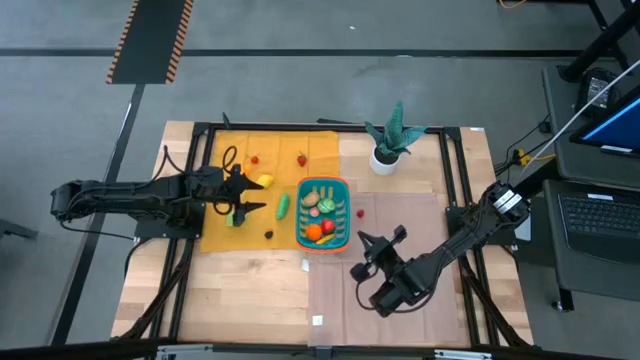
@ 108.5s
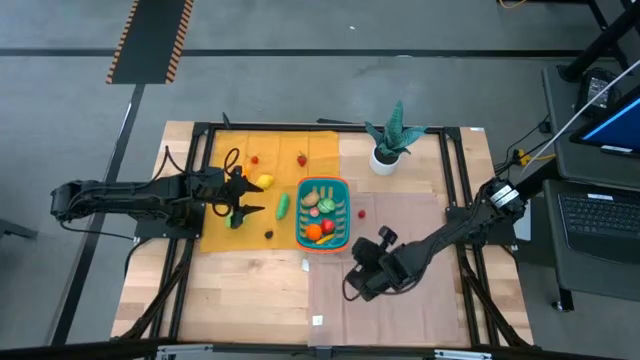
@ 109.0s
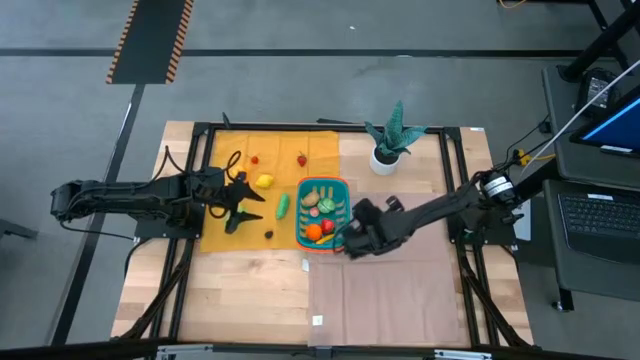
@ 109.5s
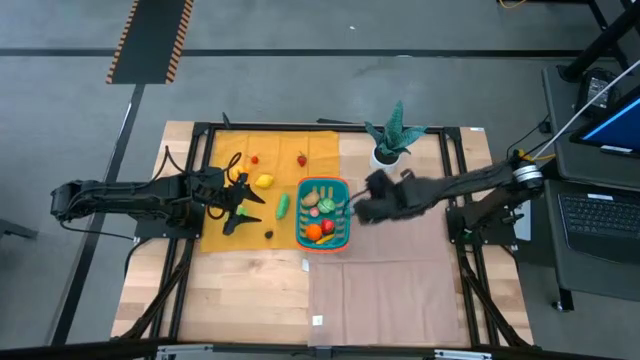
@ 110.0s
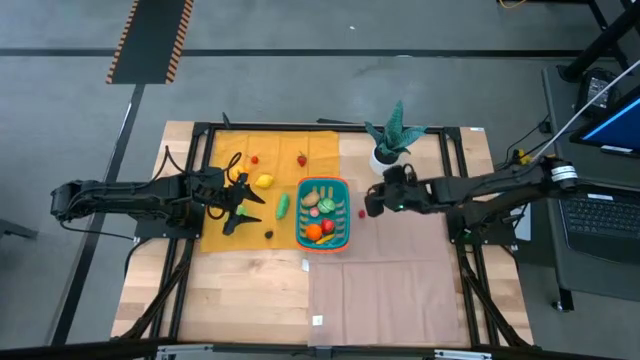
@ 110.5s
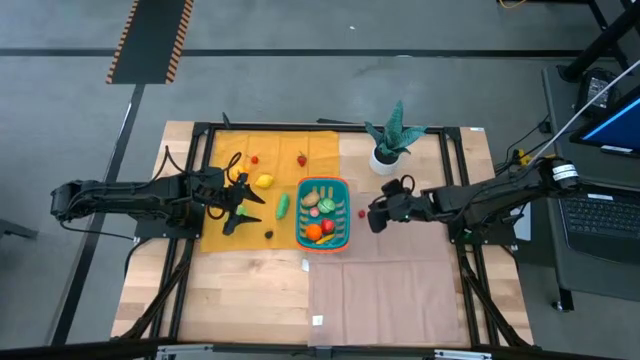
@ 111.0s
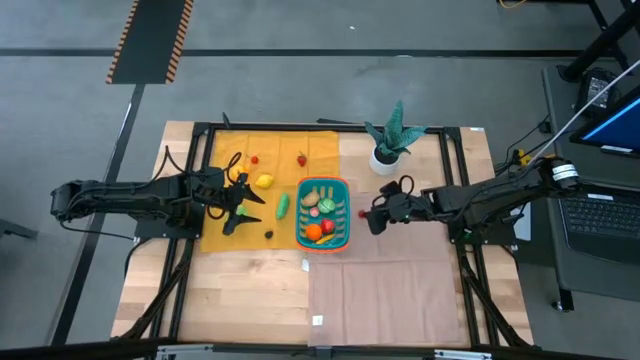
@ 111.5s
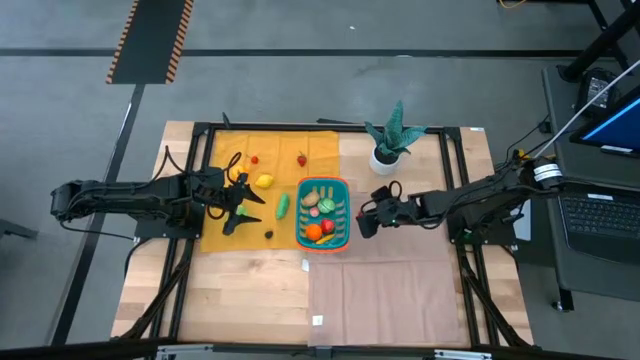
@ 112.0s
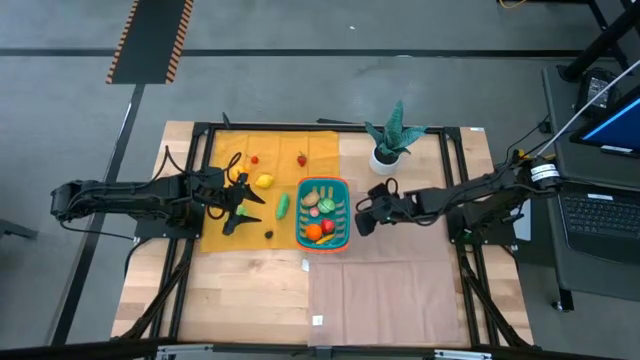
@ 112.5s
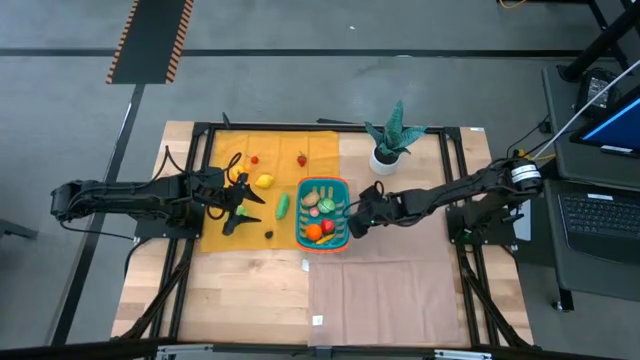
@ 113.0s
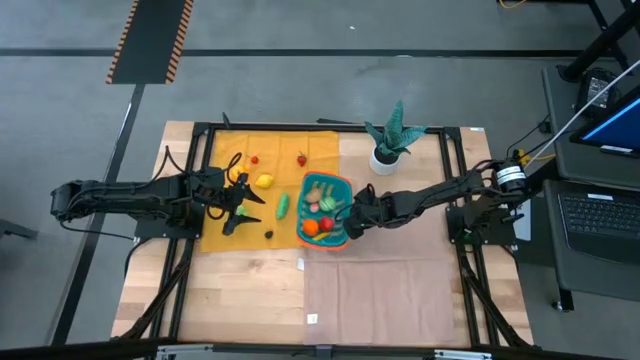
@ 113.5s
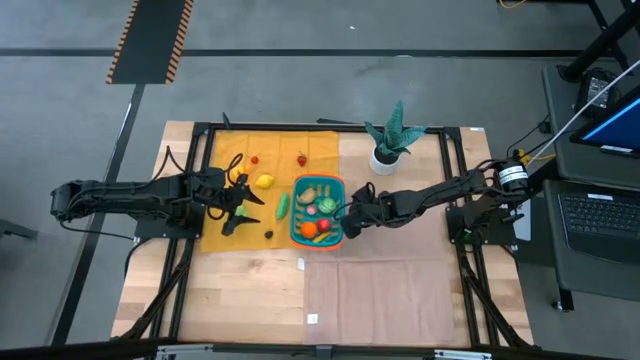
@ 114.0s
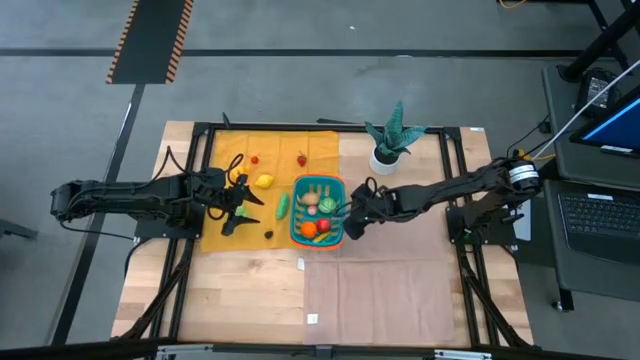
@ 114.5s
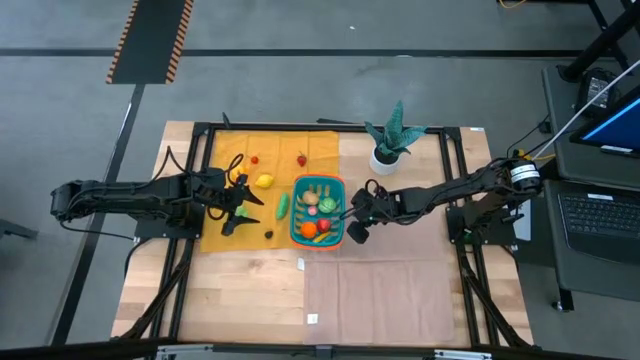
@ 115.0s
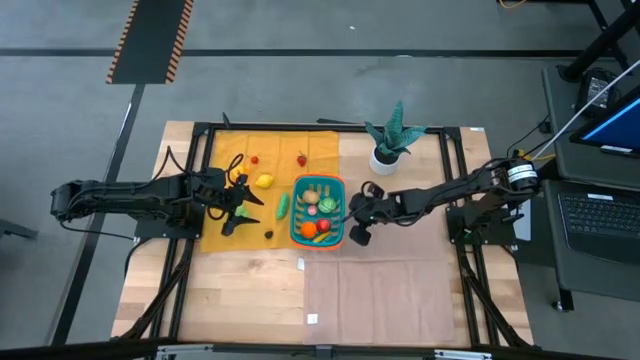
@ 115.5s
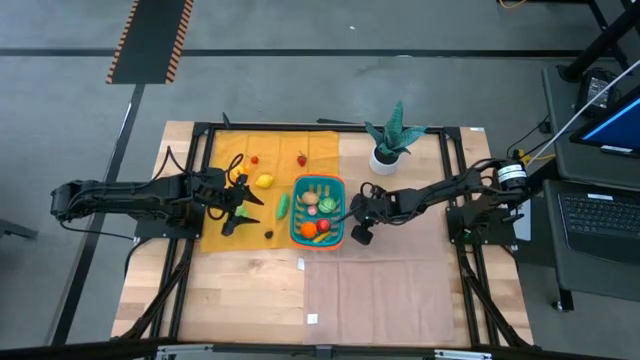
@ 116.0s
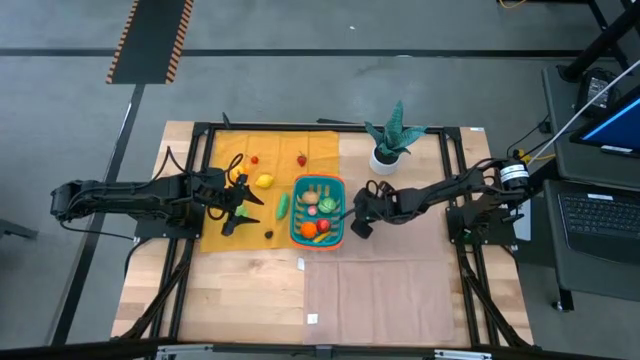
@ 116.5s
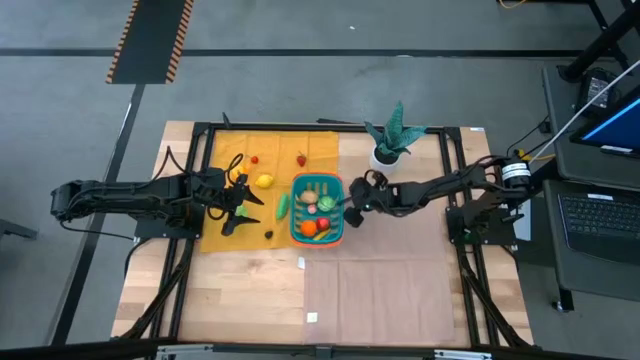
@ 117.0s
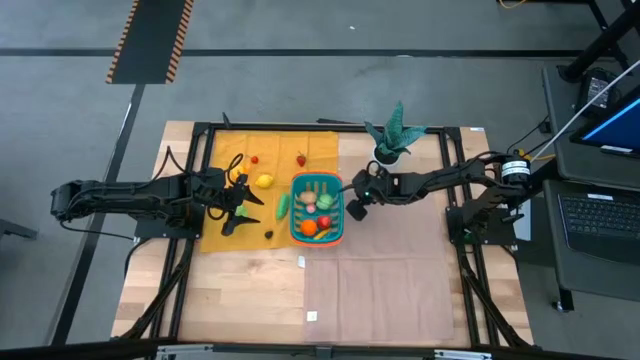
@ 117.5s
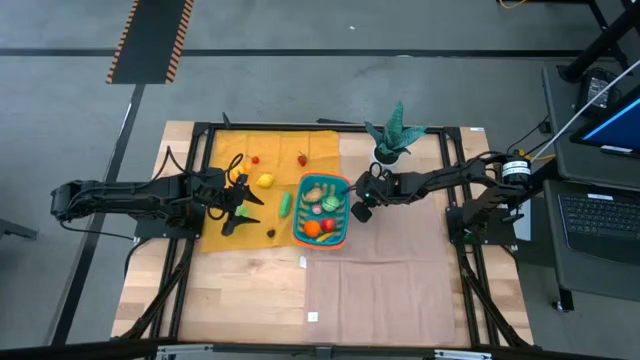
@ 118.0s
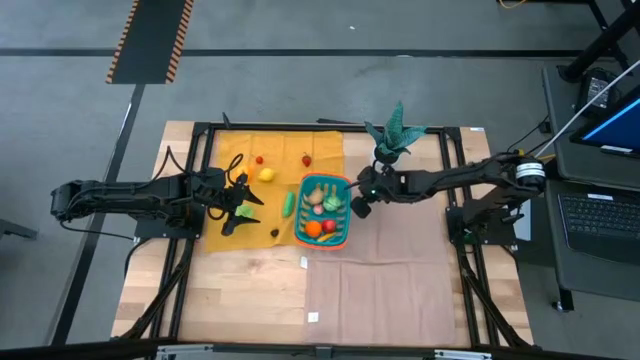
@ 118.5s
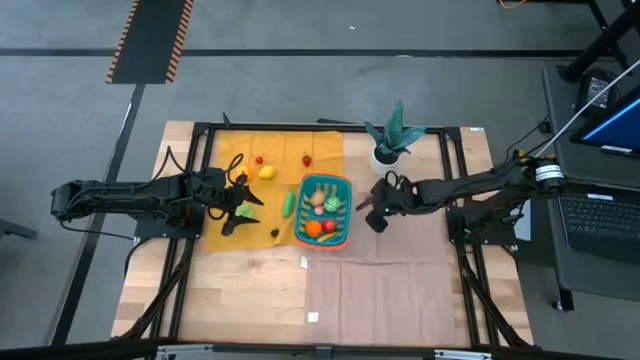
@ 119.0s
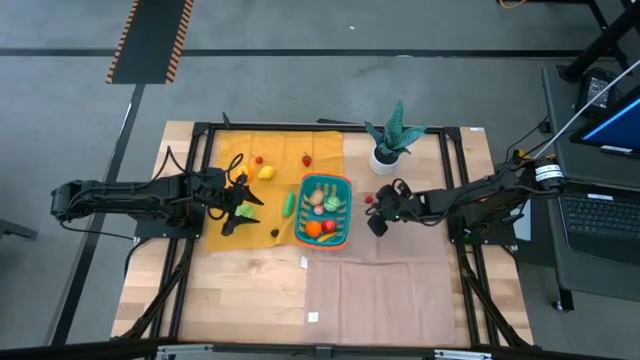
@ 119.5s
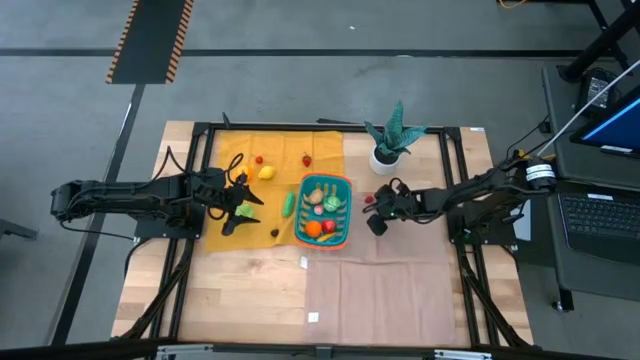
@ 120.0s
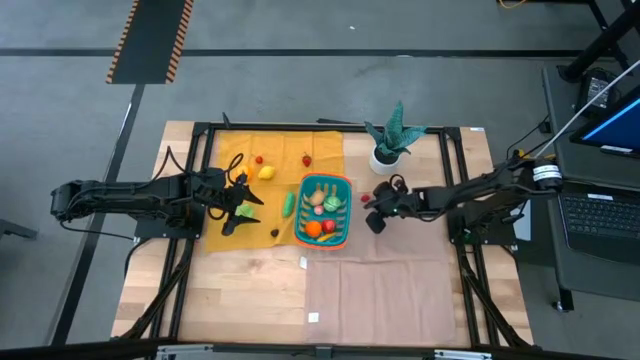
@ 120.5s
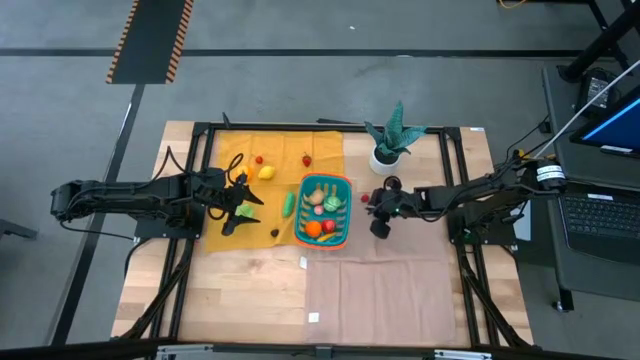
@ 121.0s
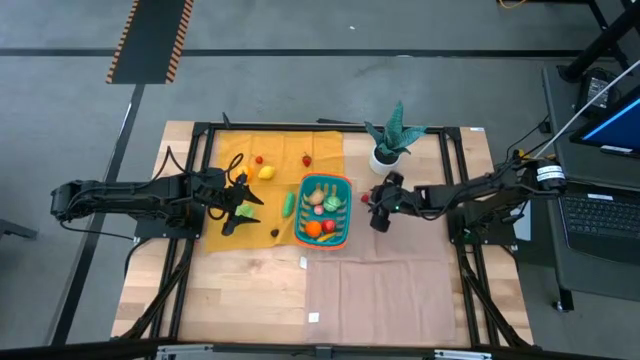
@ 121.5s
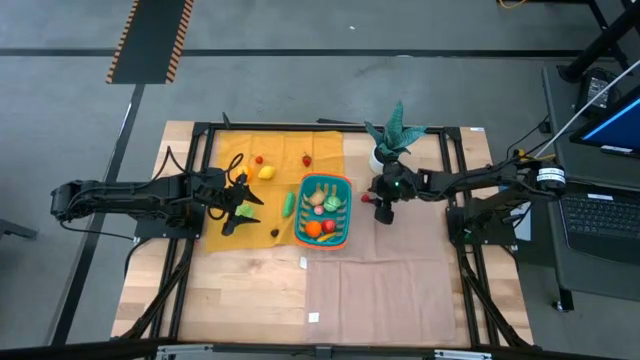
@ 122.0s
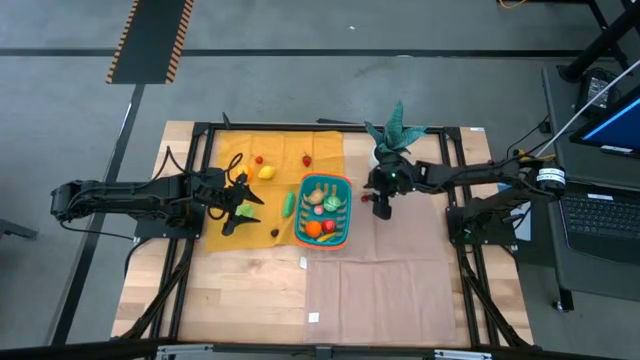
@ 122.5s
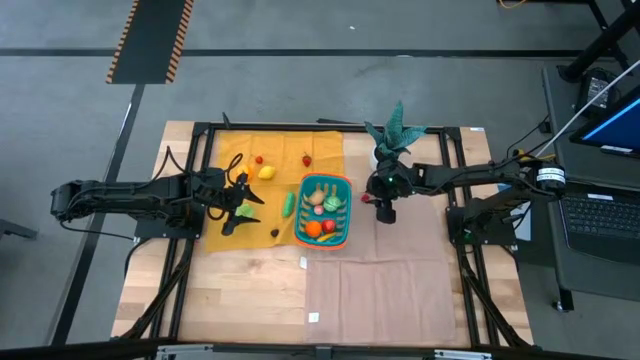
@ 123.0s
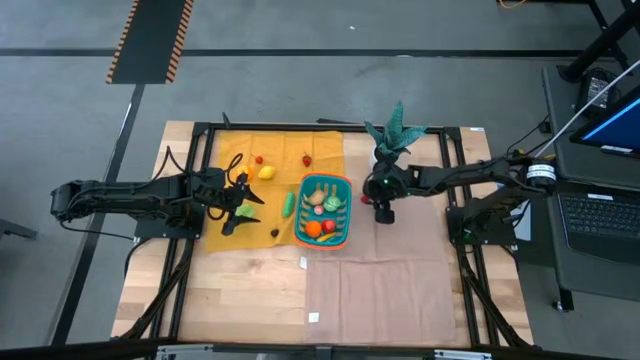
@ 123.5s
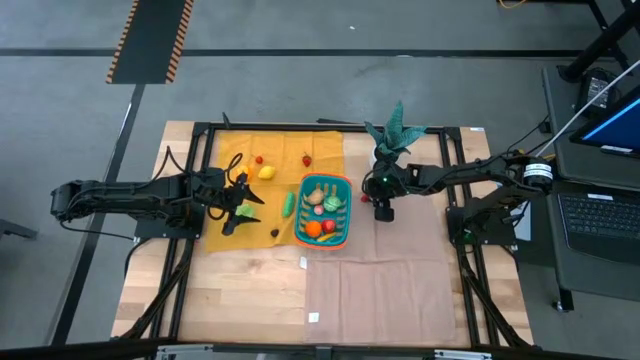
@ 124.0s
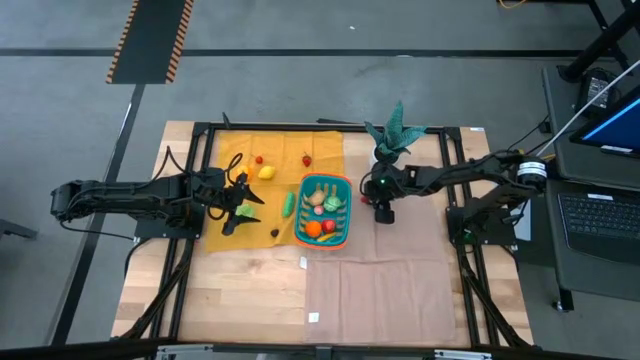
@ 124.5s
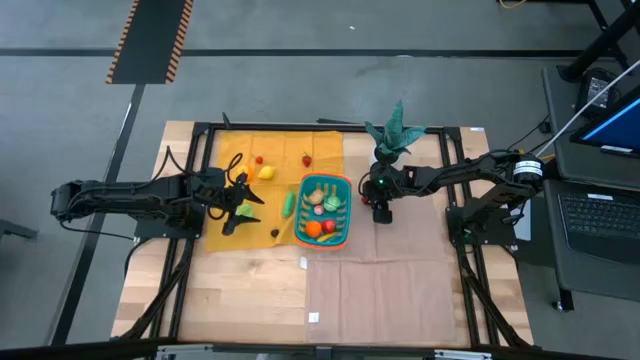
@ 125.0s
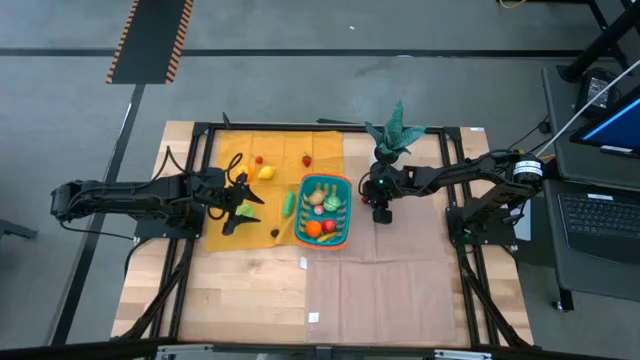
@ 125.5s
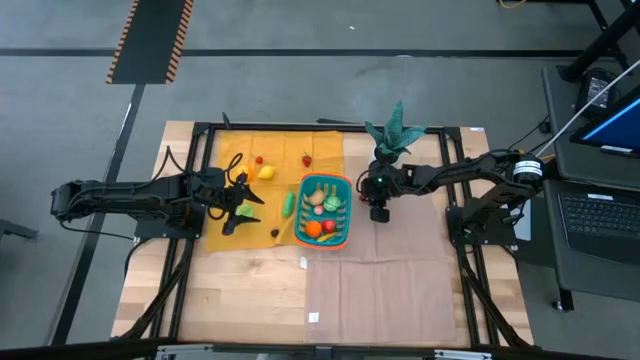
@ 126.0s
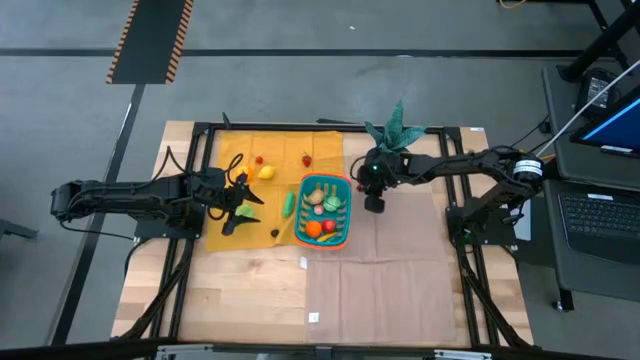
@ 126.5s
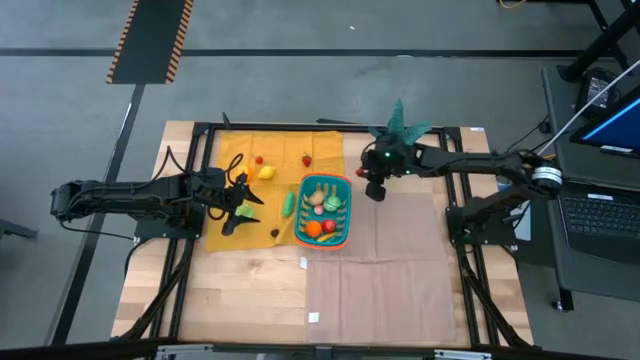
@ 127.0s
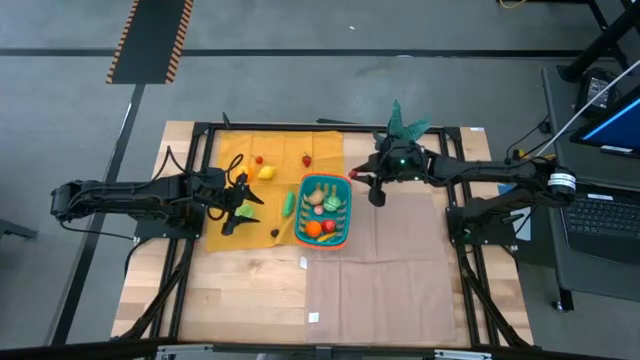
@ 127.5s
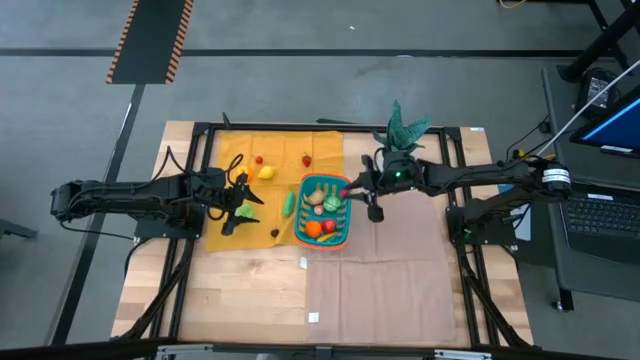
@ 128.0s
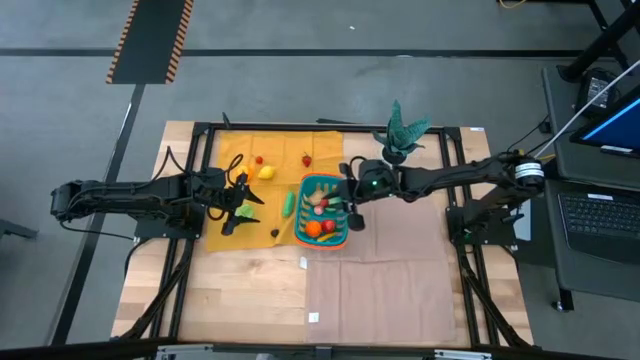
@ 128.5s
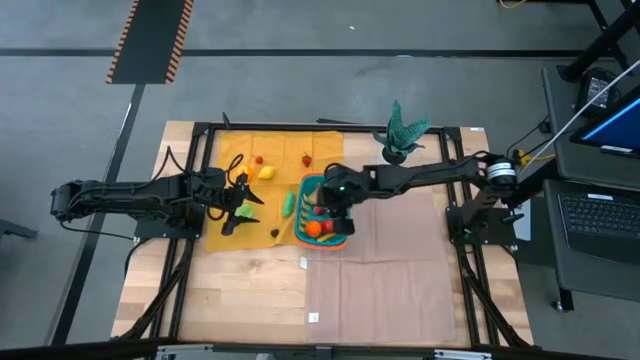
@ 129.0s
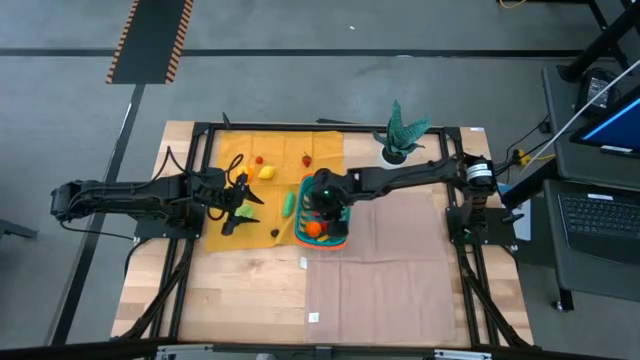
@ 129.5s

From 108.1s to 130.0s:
Task: Pick and placing Produce into tupperware
Put the bottom raspberry into the basket
